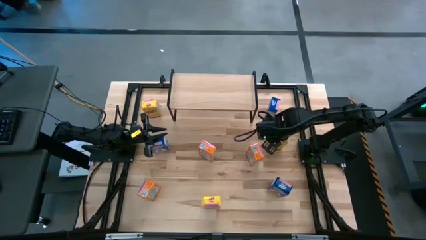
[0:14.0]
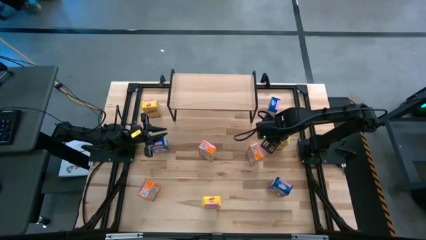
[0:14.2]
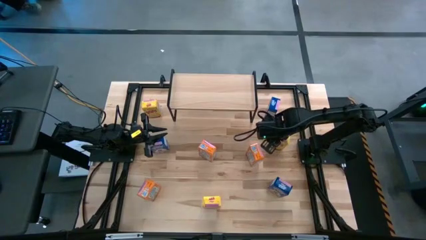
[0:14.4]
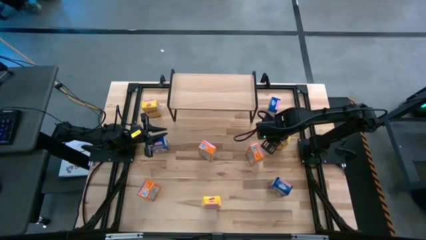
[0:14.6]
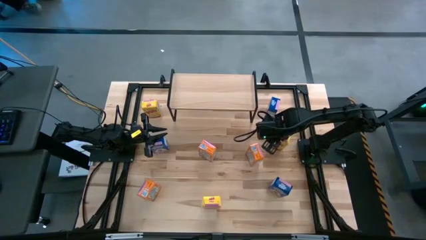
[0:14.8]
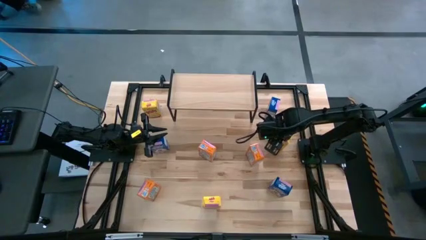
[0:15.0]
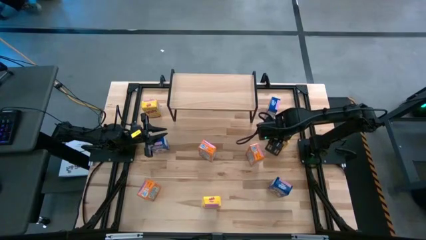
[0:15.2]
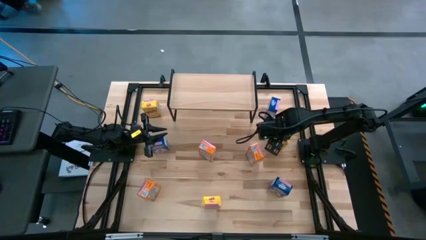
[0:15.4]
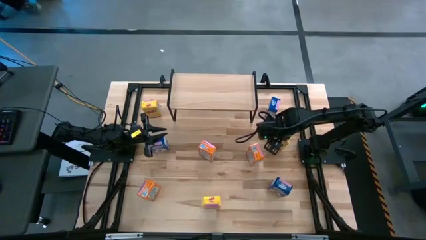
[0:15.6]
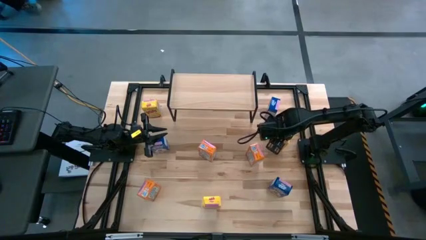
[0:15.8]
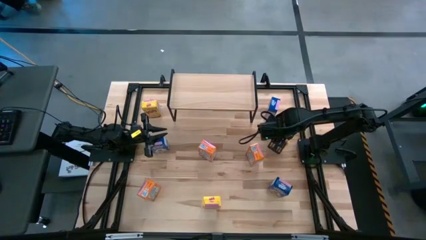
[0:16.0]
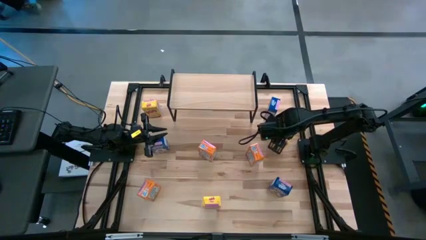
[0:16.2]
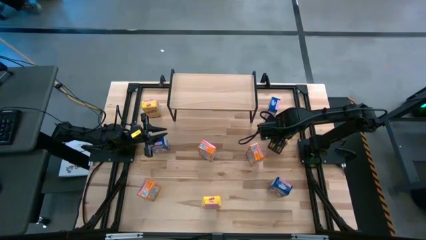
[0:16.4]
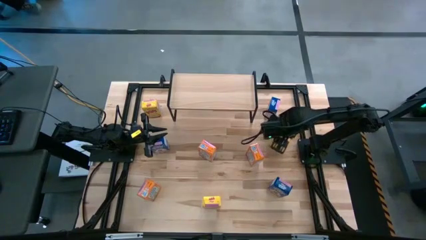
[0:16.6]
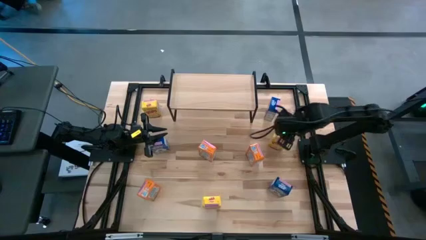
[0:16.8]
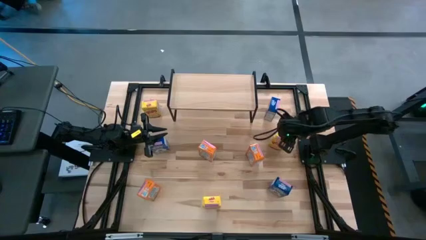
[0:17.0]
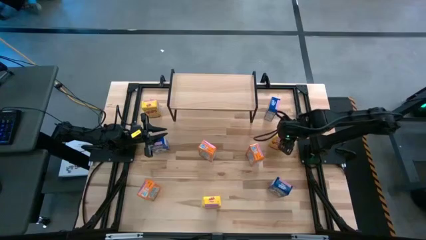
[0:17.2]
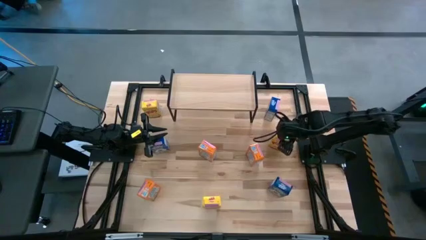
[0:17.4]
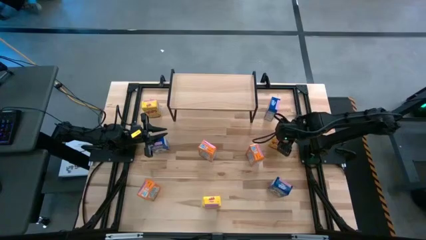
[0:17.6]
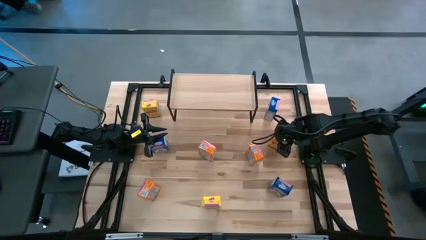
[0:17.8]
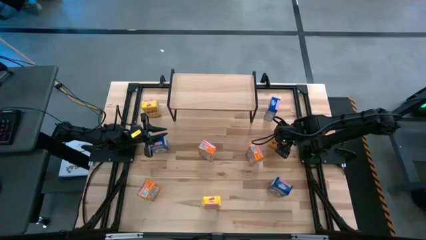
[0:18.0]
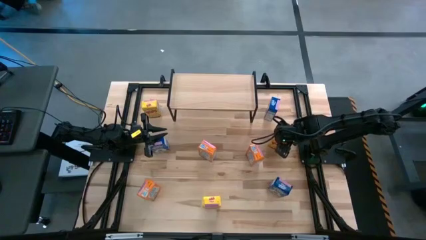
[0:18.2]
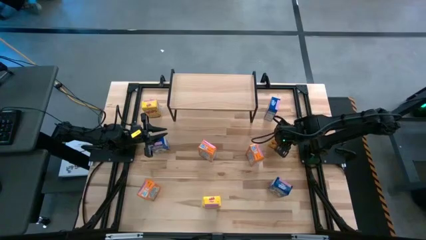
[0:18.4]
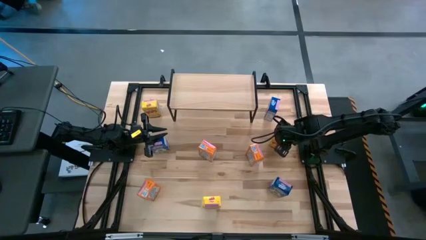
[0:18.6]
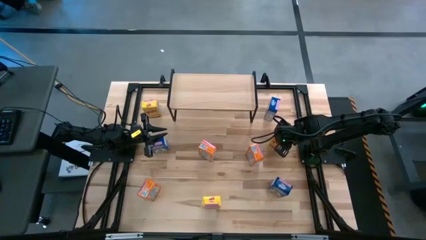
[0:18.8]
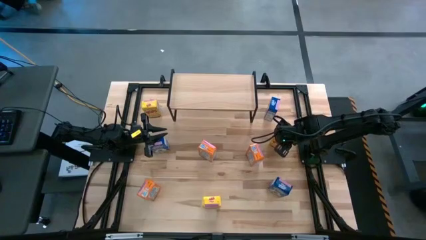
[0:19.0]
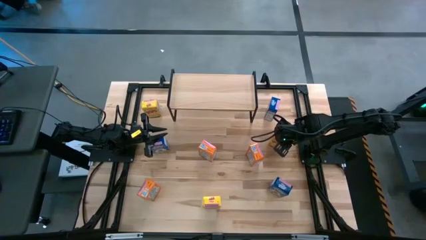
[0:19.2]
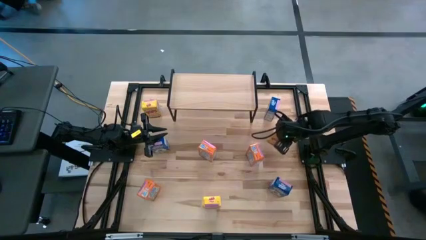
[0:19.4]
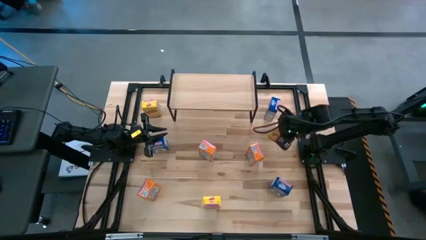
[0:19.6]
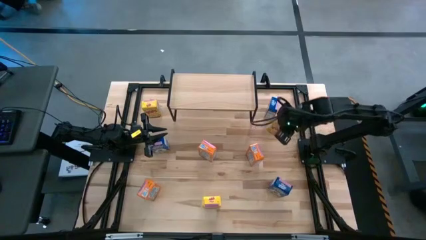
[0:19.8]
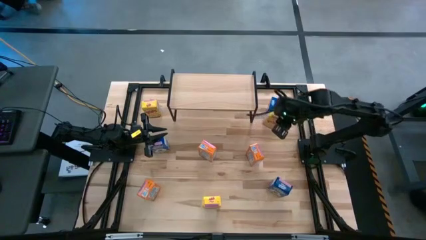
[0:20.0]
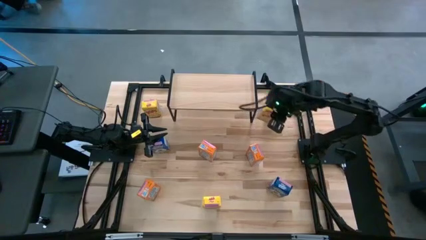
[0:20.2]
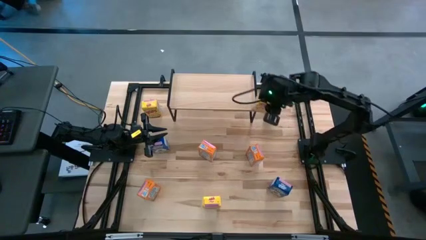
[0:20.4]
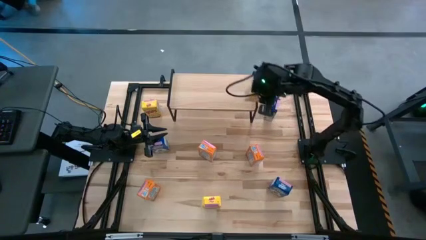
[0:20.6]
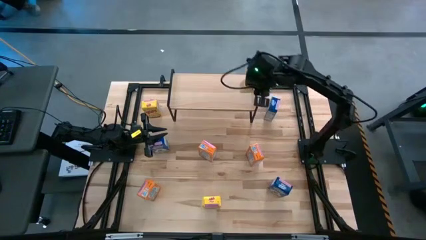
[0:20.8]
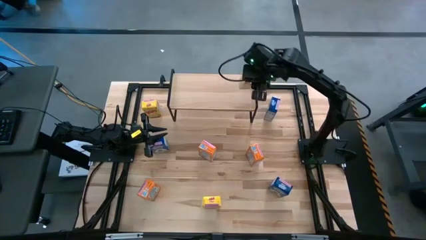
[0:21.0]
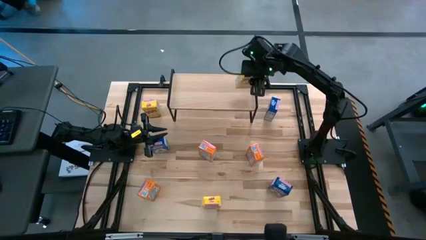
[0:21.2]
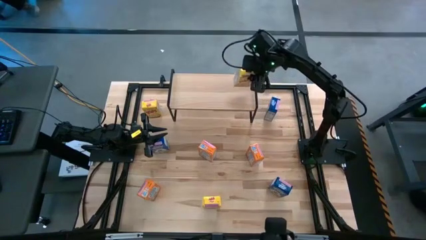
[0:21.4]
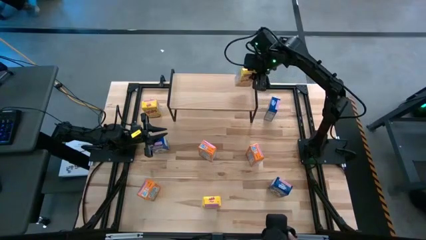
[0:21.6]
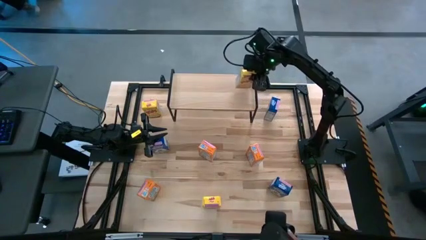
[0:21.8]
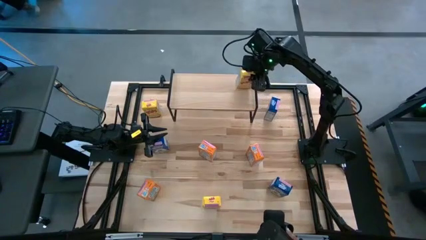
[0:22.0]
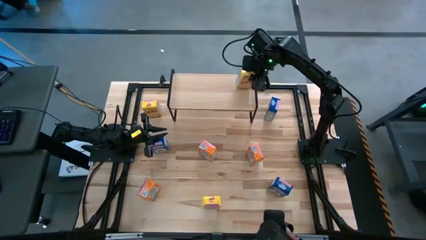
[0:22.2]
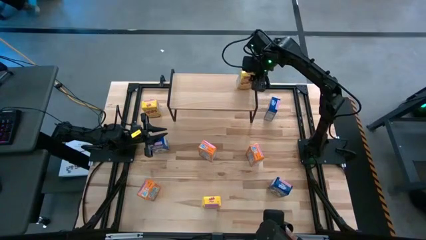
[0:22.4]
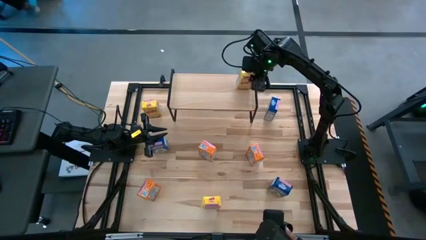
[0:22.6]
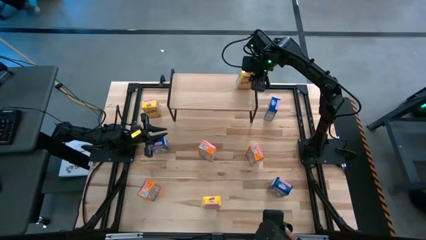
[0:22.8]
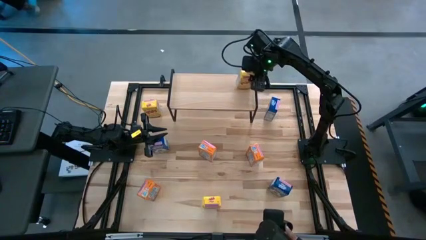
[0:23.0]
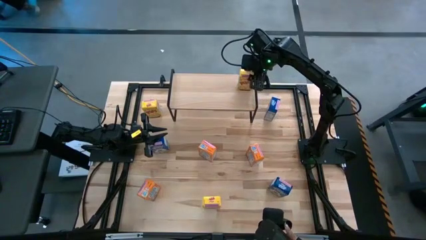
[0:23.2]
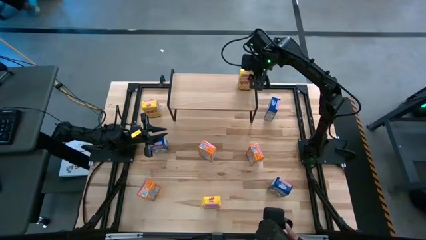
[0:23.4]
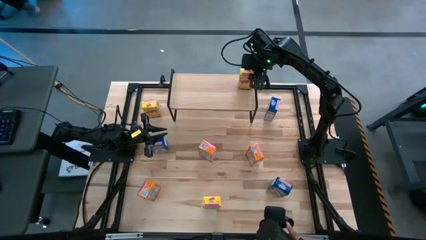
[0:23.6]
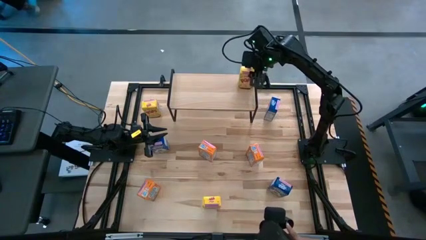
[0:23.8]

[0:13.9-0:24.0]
Task: Stack cereal on shelf
Put the middle right yellow cereal box on the shelf
